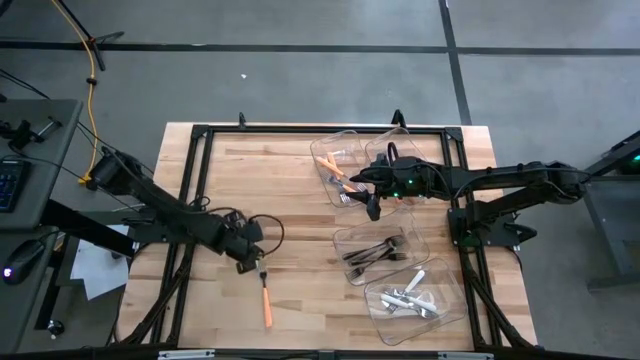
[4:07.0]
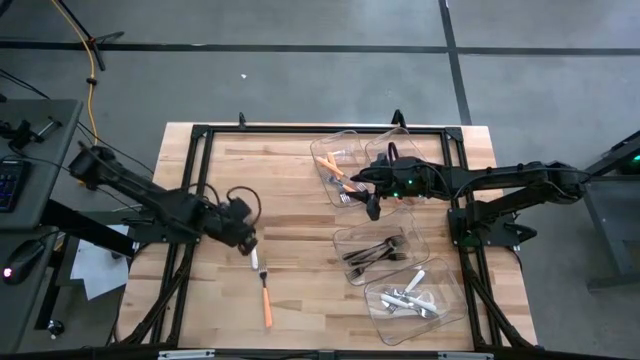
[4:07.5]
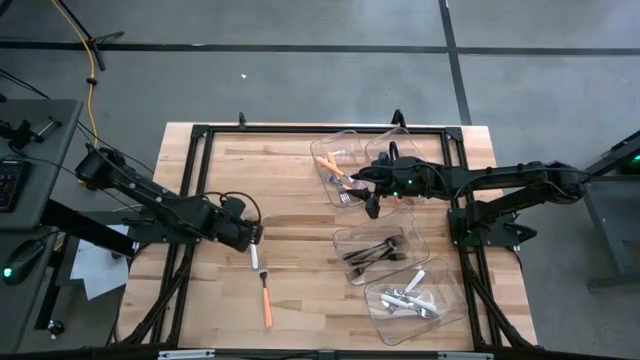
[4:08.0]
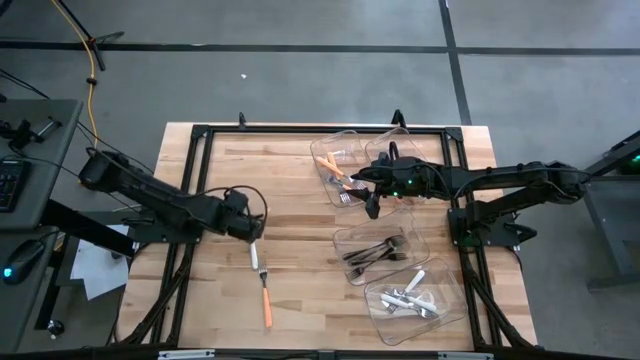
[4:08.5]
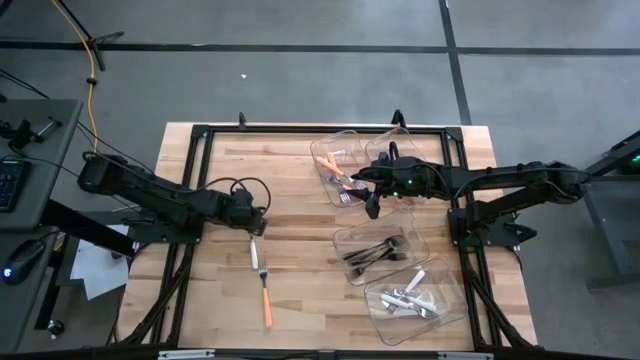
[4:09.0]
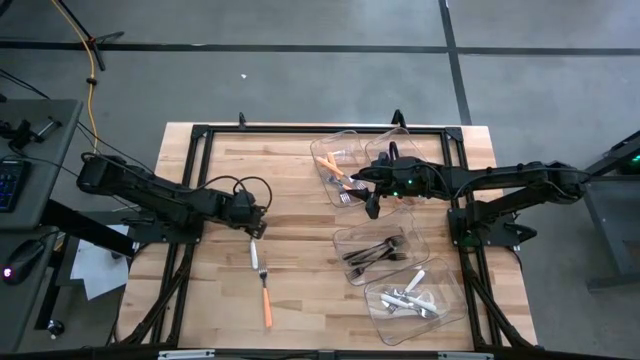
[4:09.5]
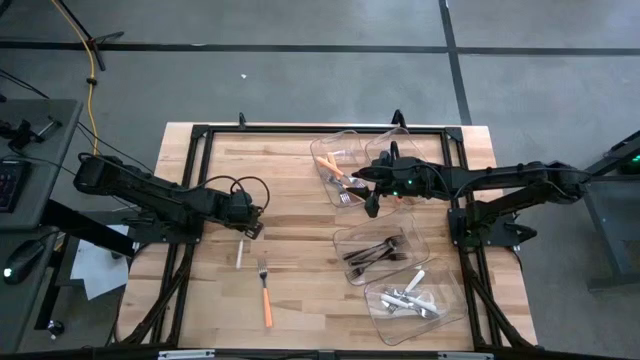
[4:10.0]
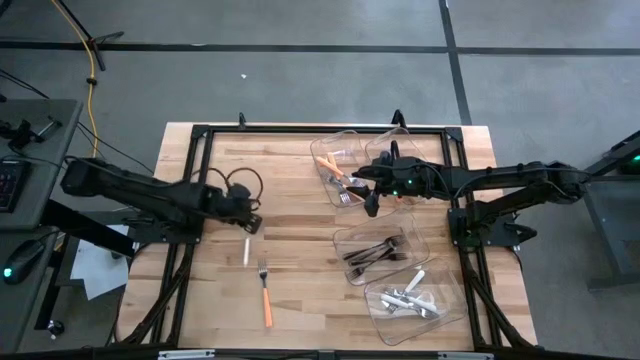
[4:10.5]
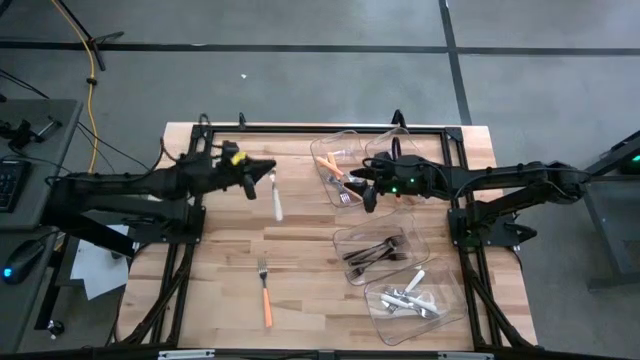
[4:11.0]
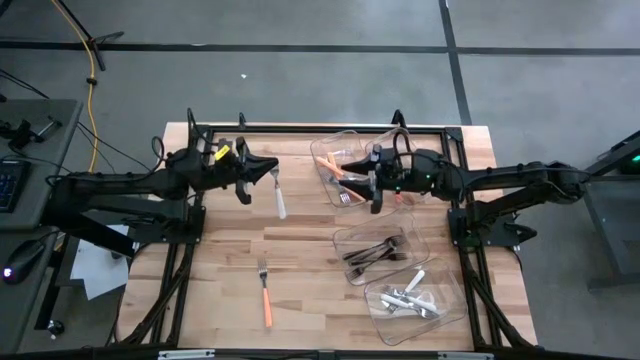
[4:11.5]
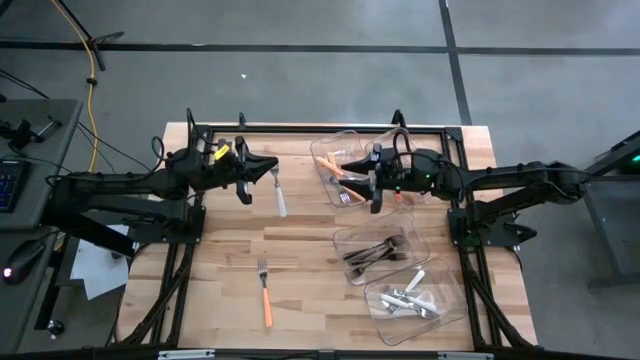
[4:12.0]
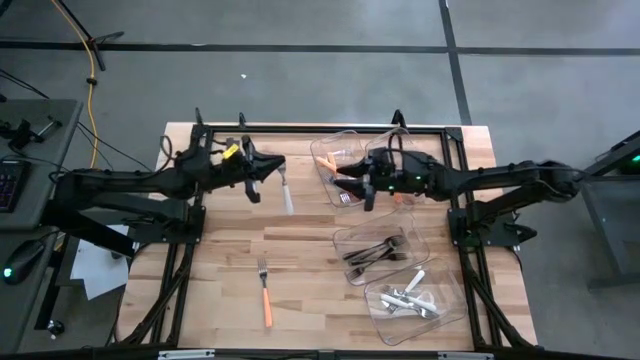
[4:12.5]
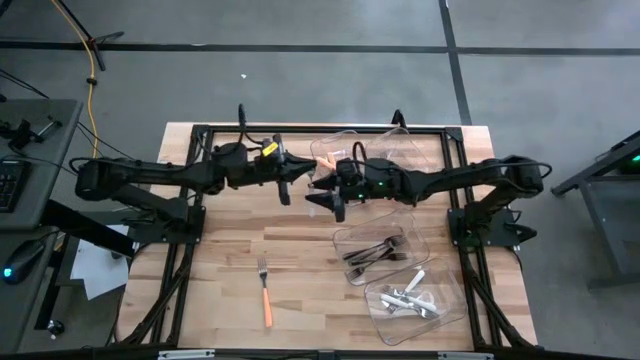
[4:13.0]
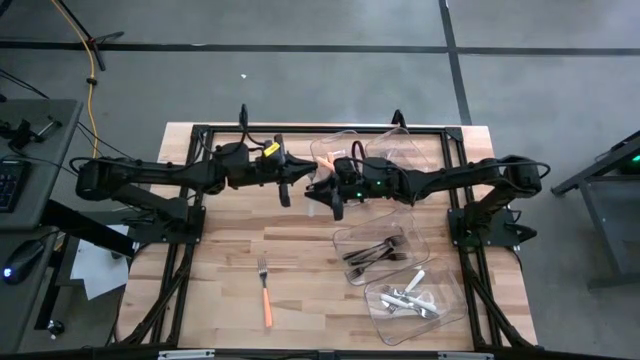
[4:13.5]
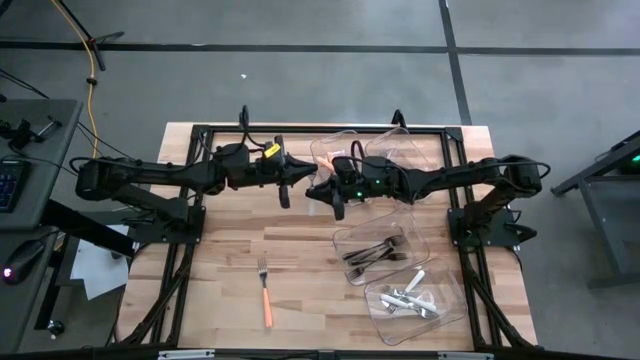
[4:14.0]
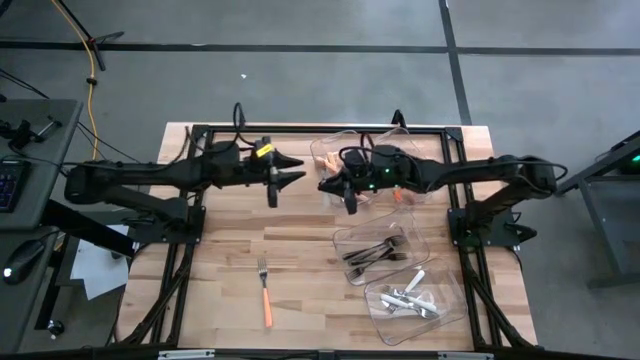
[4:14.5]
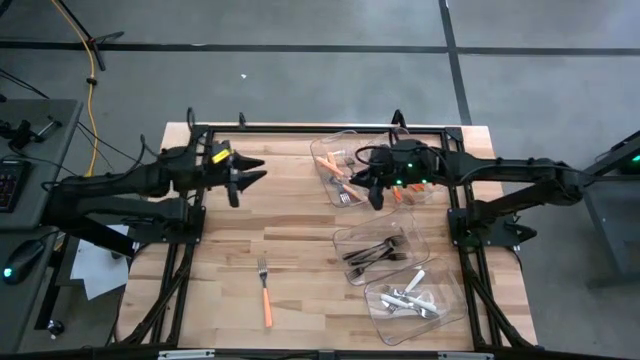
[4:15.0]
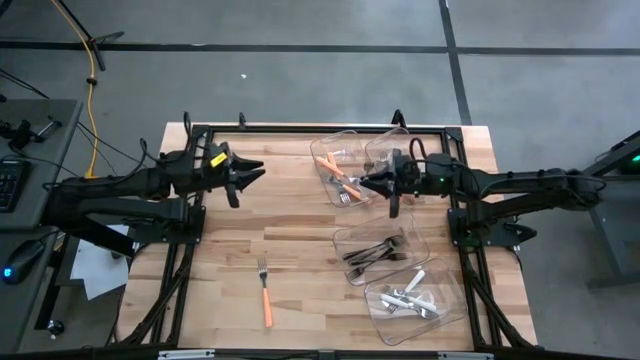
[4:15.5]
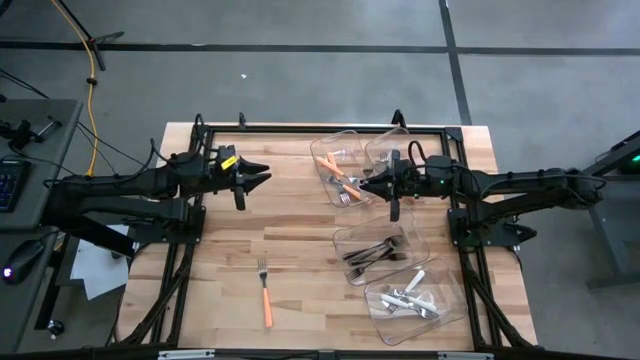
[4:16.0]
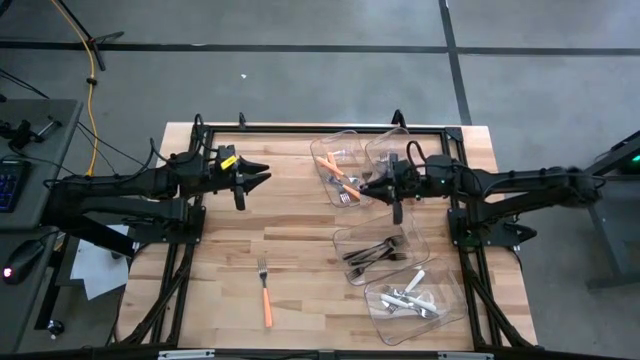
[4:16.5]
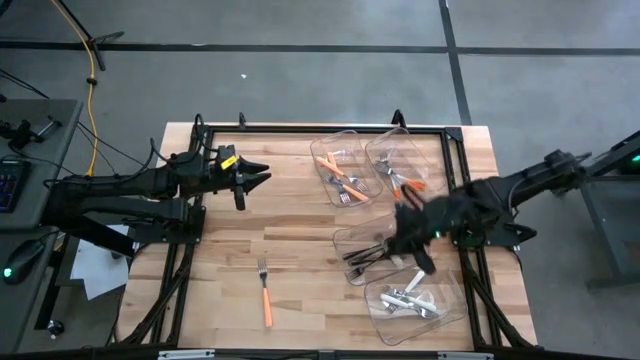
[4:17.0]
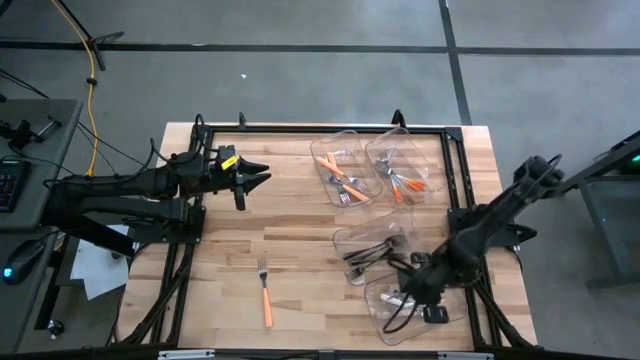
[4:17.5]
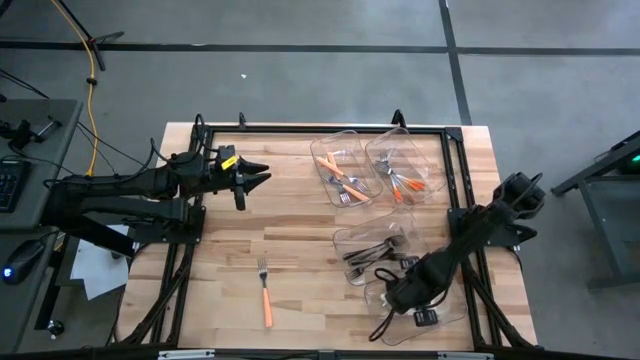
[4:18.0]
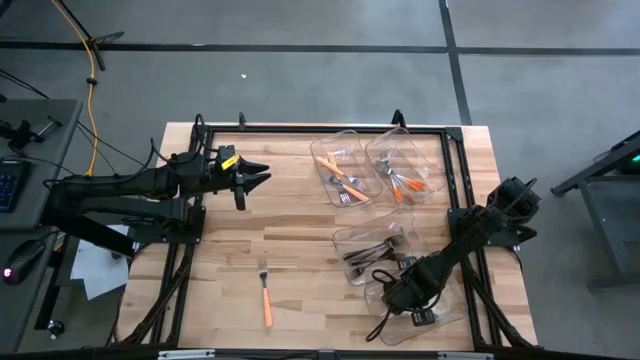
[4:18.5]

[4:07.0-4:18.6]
Task: Sort silverware by color (type)
Put the white fork into the bottom transparent bin

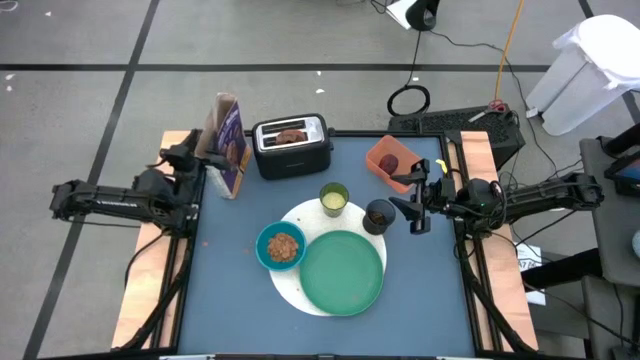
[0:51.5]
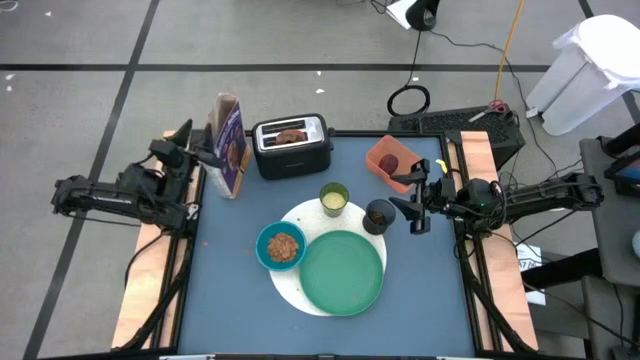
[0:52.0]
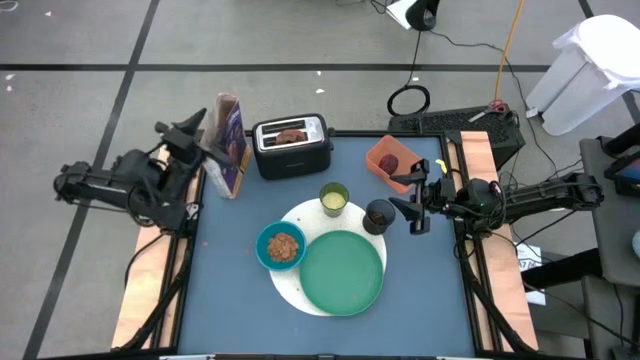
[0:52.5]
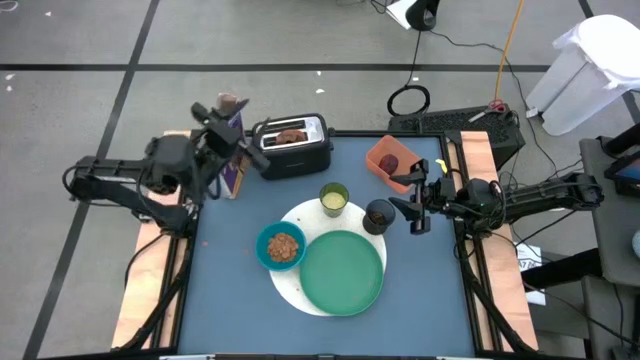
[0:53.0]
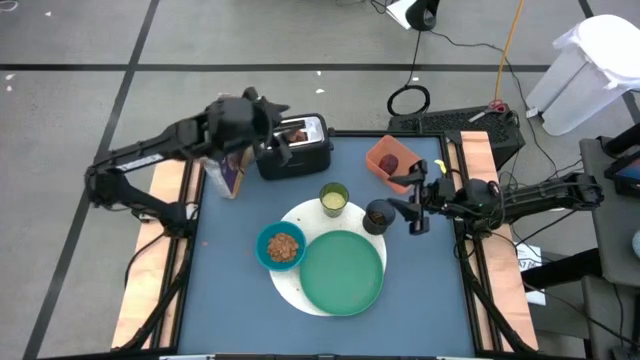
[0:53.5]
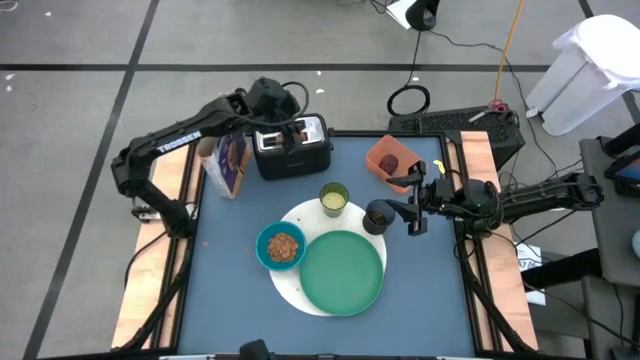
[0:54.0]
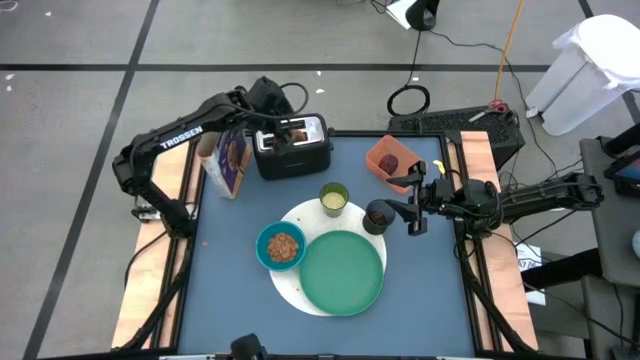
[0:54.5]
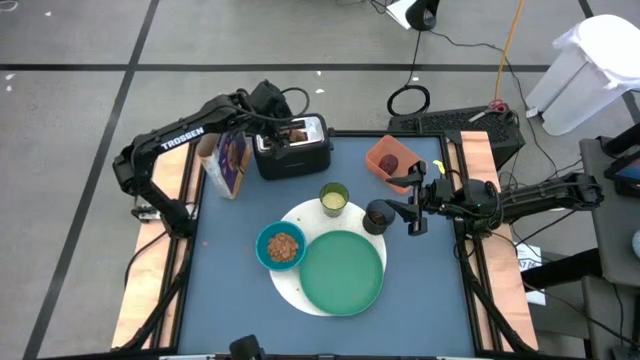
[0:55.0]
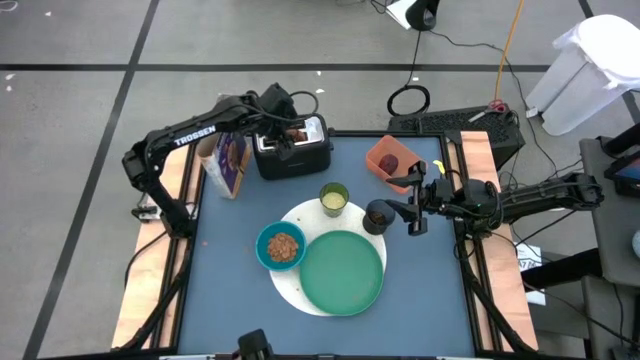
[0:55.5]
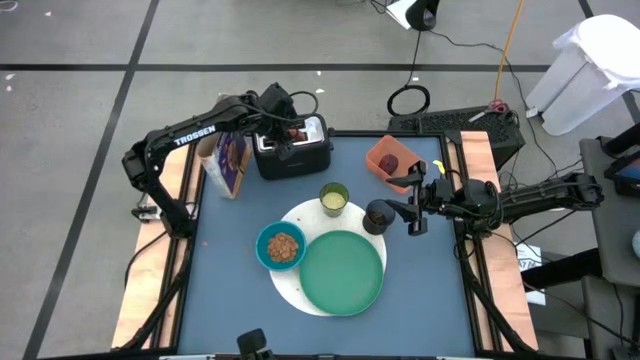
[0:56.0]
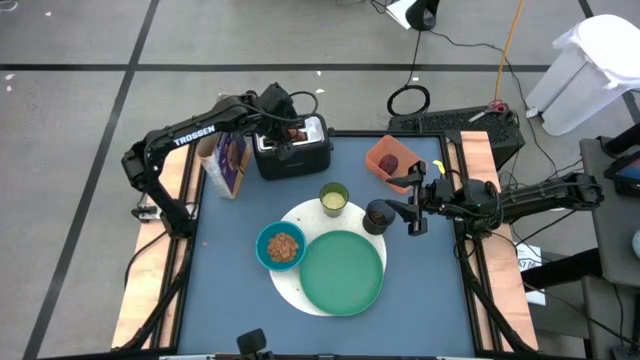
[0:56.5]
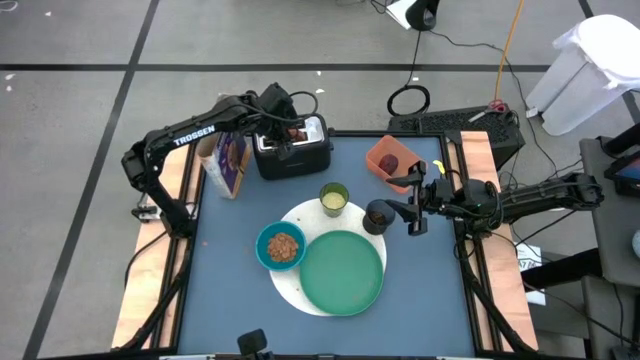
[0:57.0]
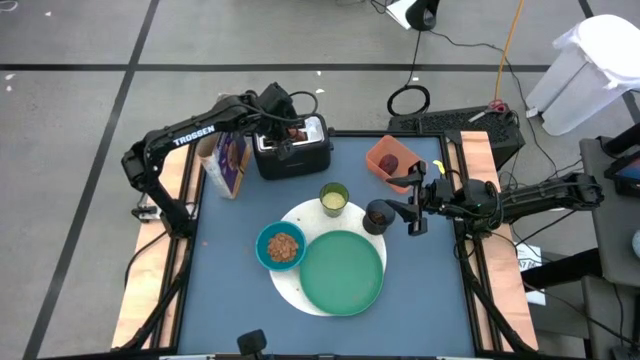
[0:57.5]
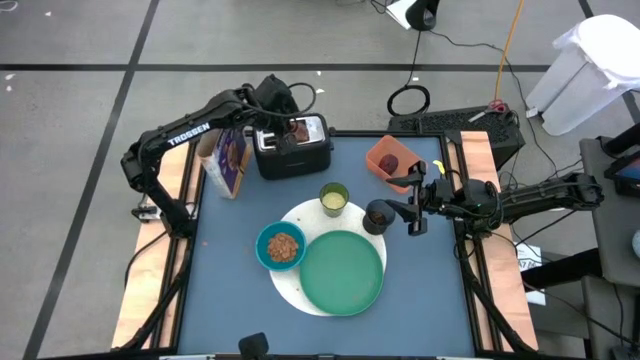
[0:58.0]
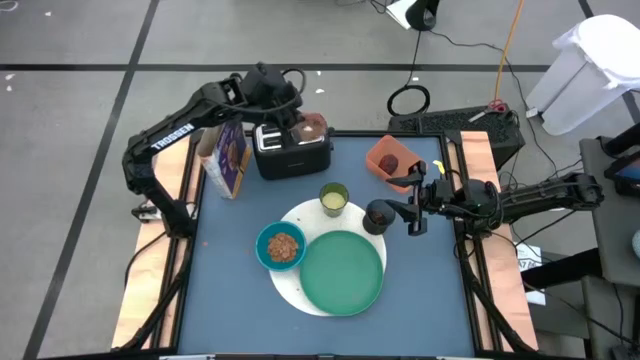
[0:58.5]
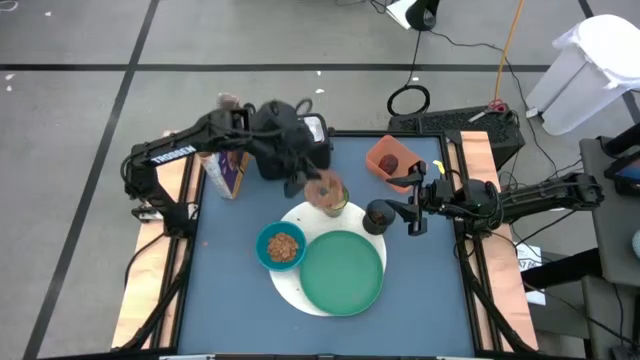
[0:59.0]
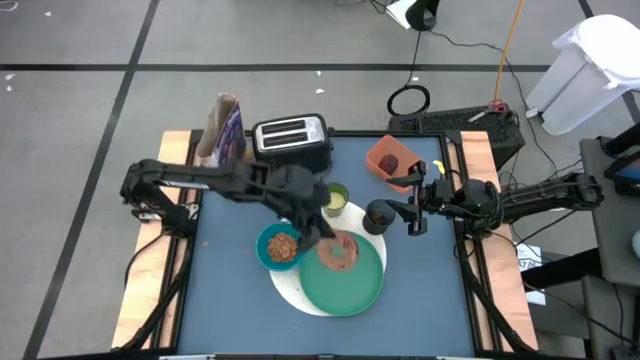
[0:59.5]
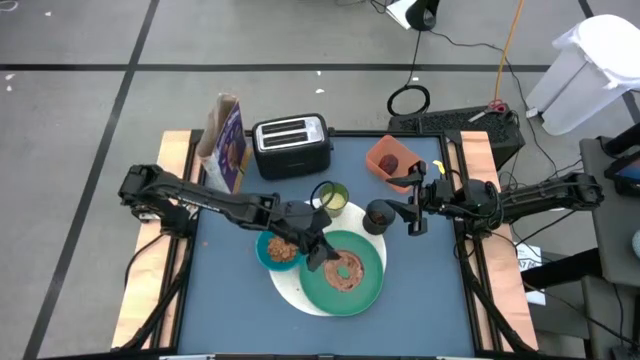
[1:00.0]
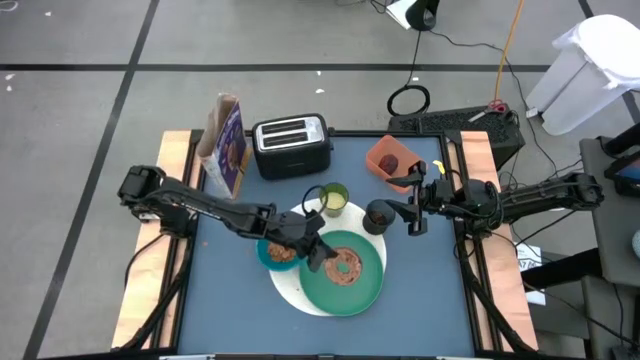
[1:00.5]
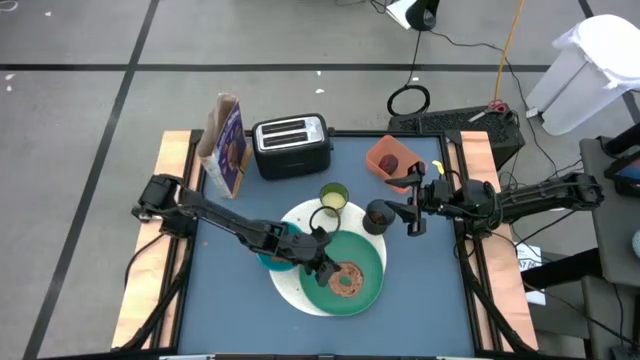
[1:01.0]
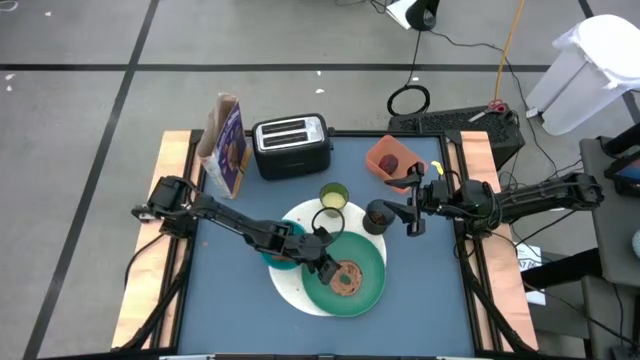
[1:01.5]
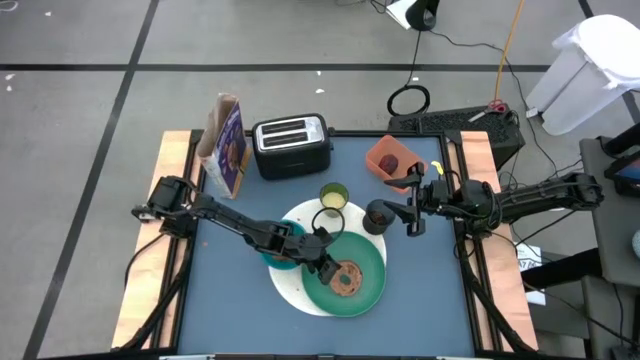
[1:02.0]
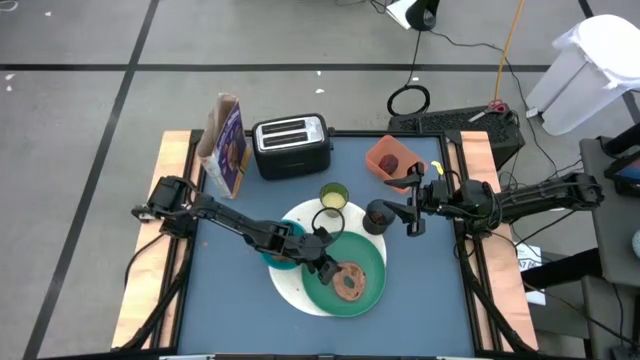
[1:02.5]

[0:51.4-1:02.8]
Task: Arrange a breakfast setting
Put the brown toasted bread on the green plate
